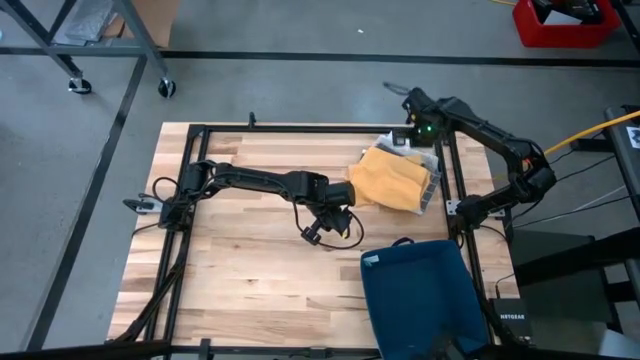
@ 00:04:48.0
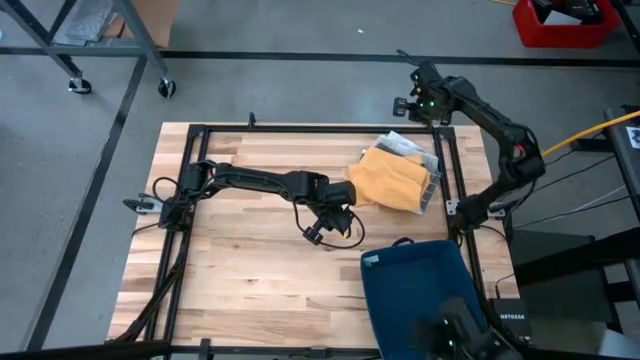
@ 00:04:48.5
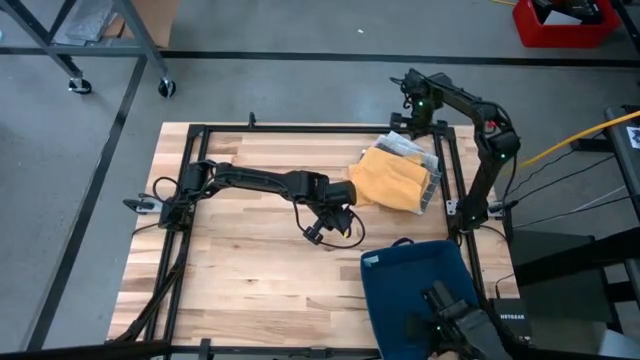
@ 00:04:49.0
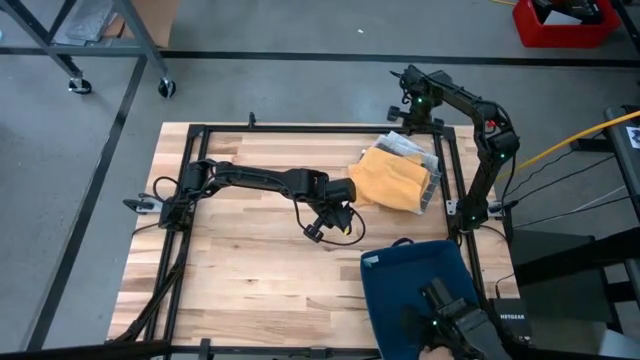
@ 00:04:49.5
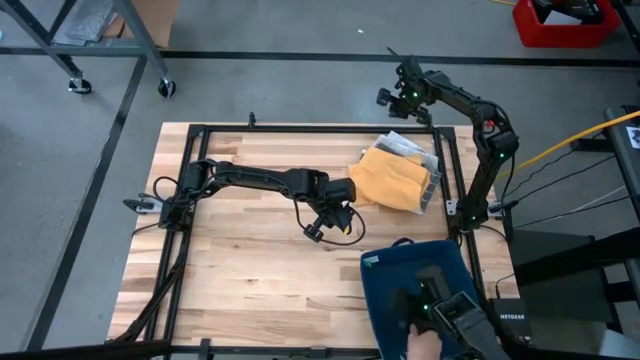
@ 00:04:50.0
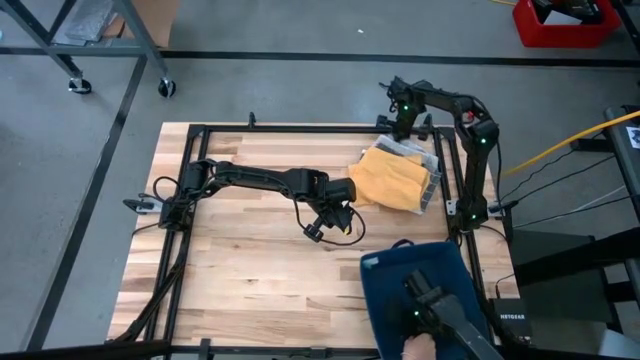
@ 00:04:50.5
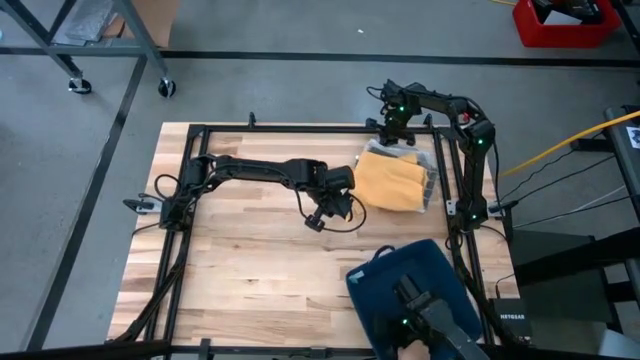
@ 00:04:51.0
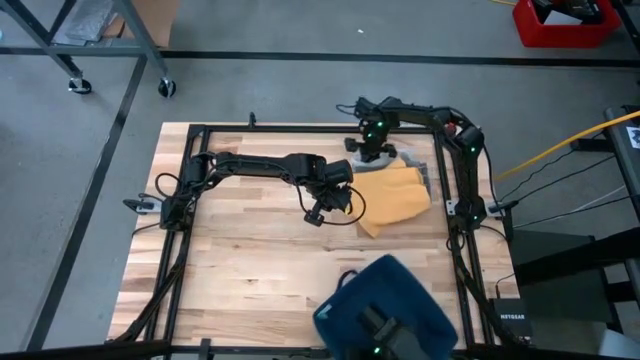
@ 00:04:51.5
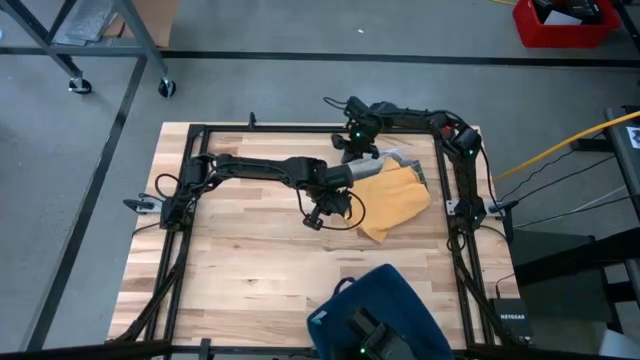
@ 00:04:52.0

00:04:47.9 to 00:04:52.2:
Task: Fold towel
Adjust the stack of towels

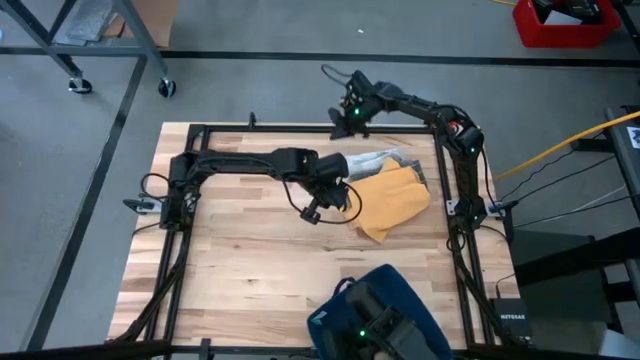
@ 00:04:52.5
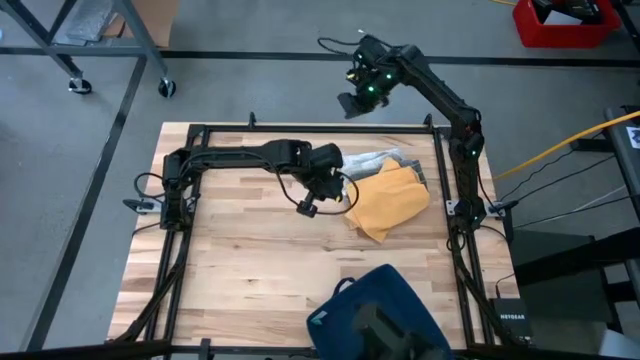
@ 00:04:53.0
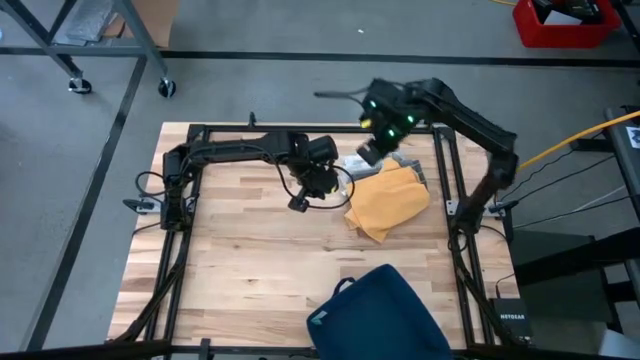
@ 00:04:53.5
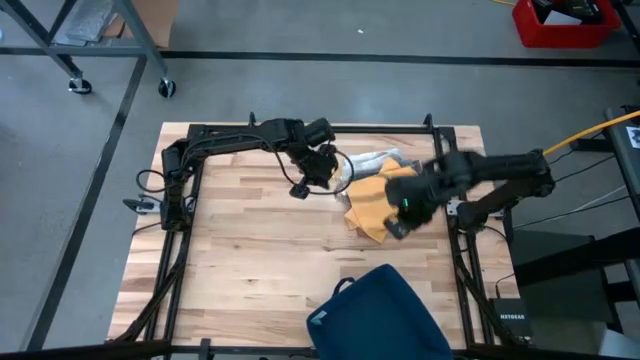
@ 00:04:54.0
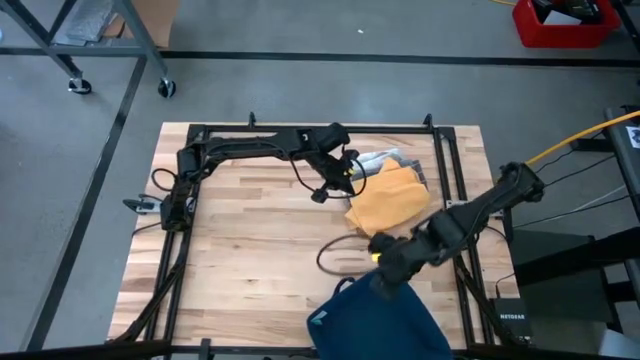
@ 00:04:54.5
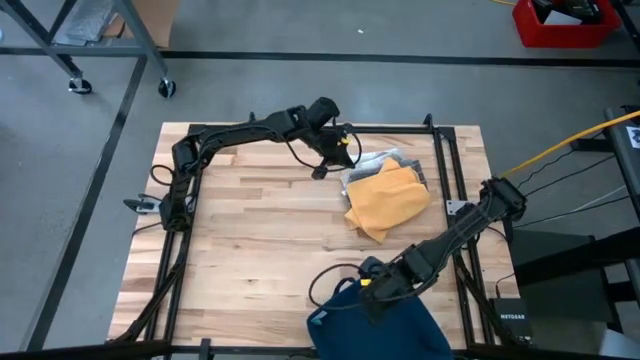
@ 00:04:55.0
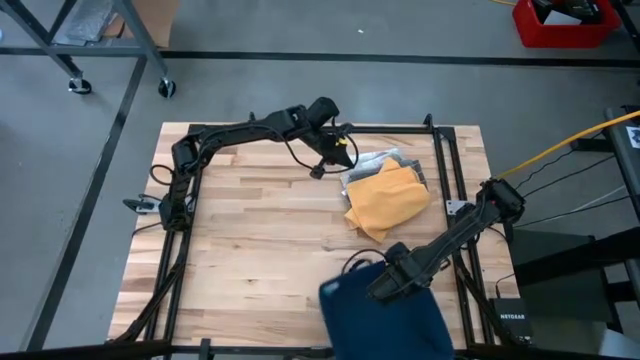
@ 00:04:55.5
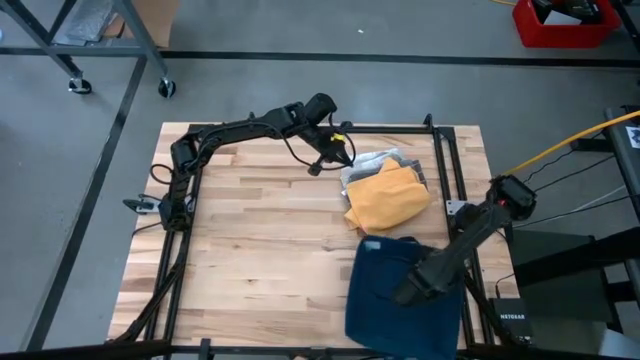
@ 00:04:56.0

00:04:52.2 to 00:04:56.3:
Adjust the blue bin

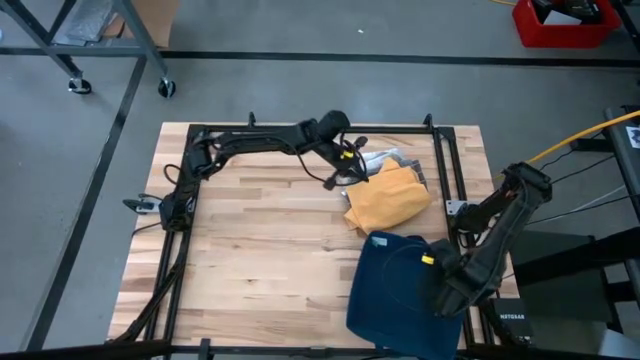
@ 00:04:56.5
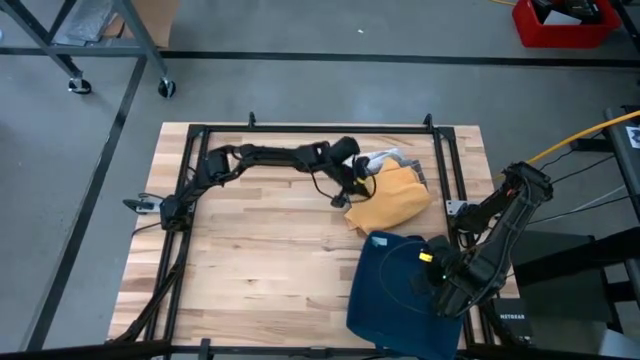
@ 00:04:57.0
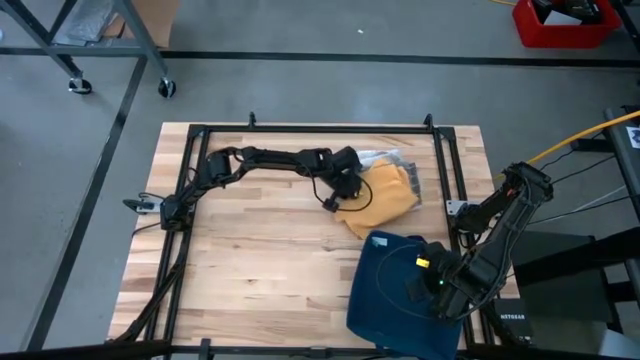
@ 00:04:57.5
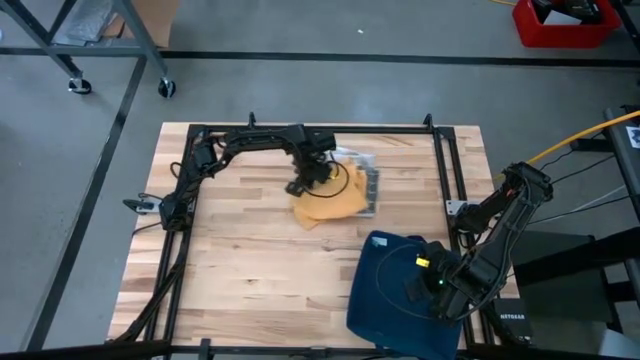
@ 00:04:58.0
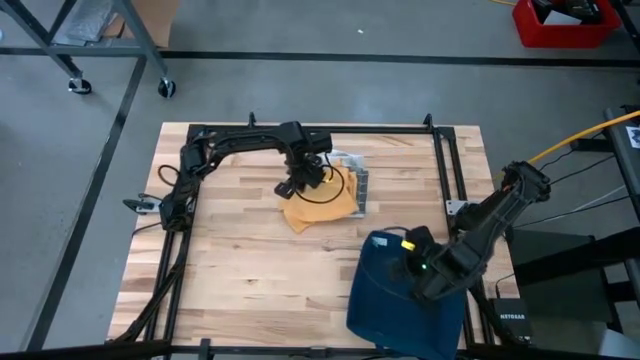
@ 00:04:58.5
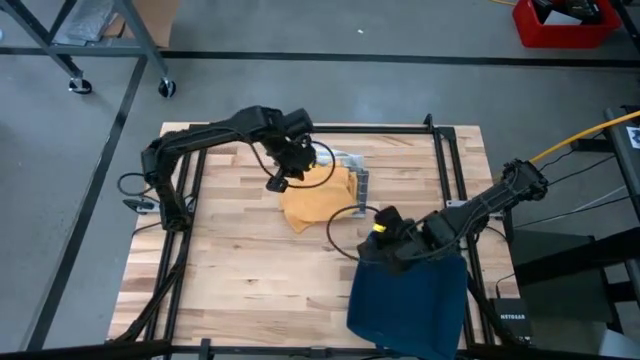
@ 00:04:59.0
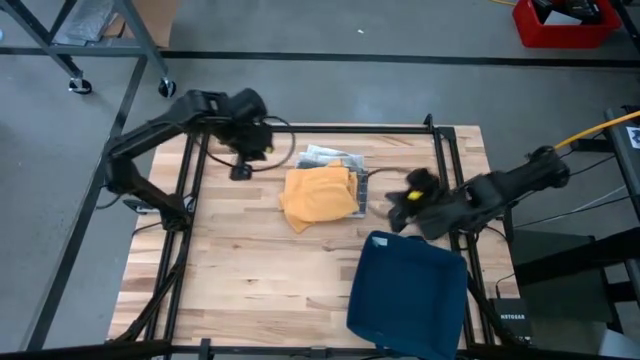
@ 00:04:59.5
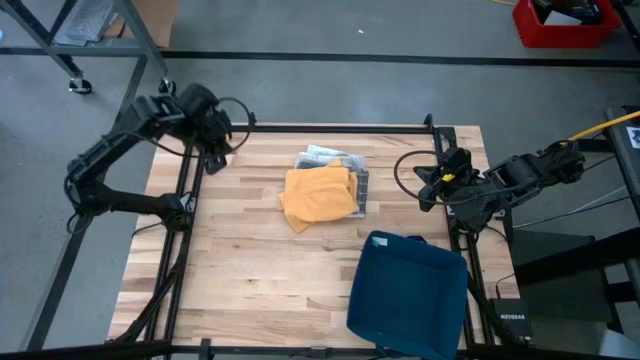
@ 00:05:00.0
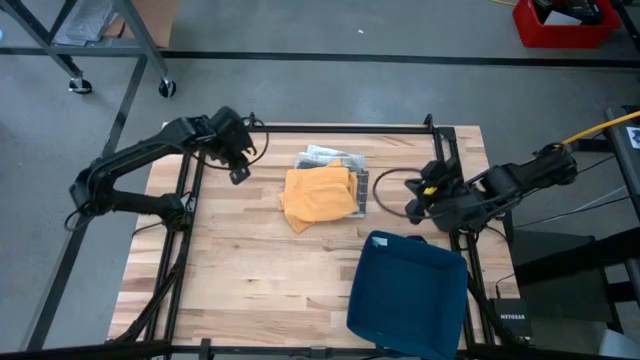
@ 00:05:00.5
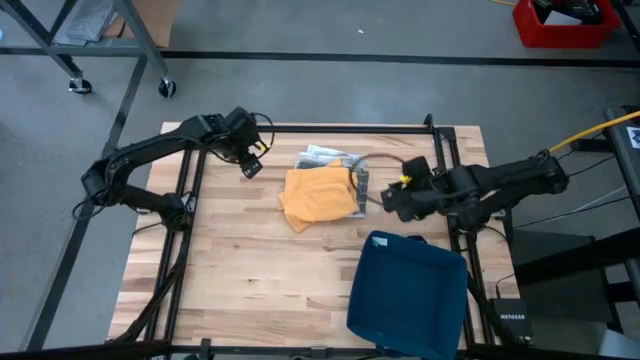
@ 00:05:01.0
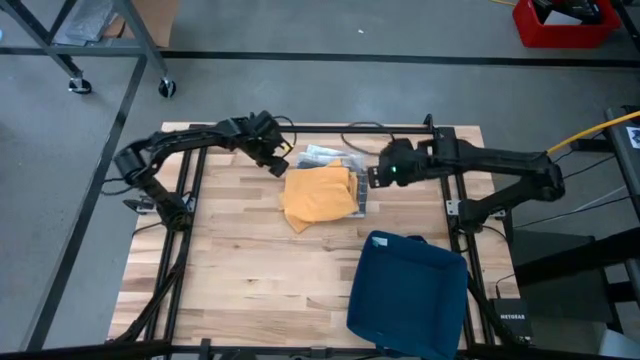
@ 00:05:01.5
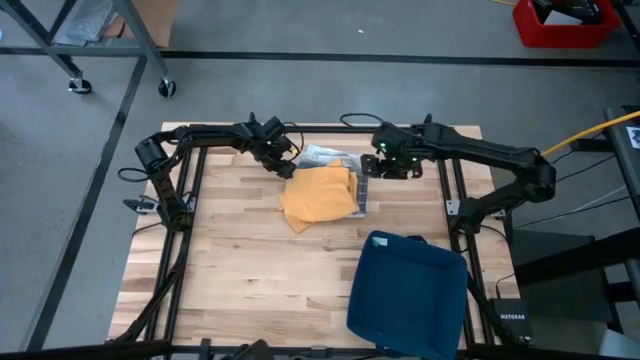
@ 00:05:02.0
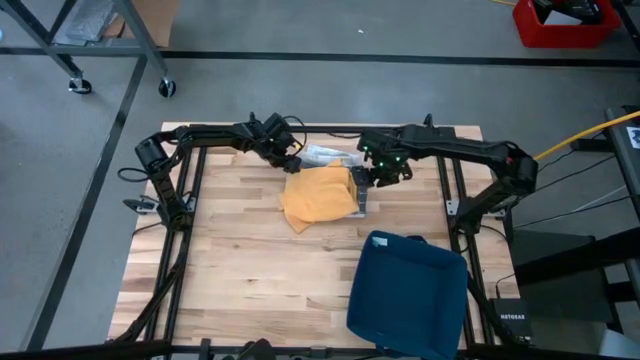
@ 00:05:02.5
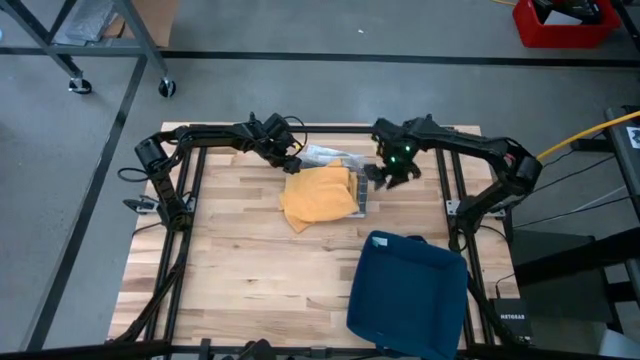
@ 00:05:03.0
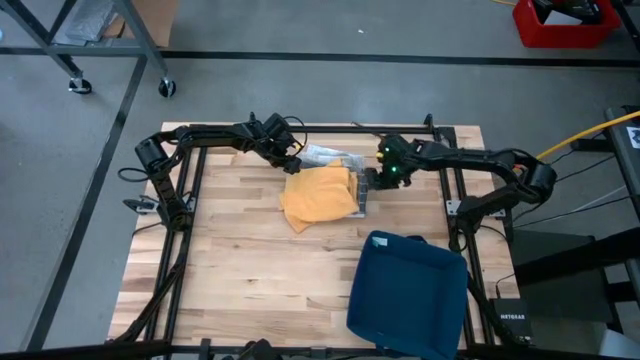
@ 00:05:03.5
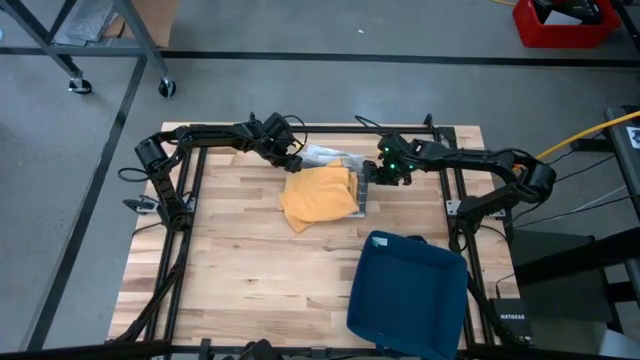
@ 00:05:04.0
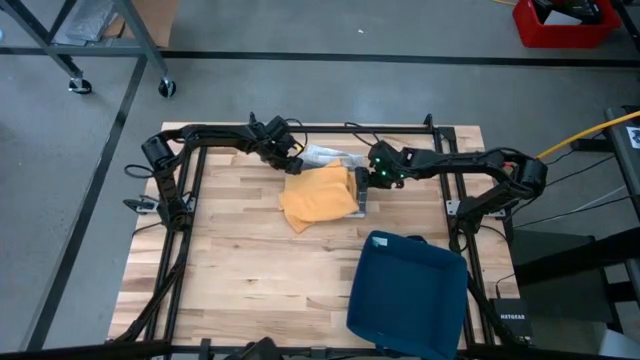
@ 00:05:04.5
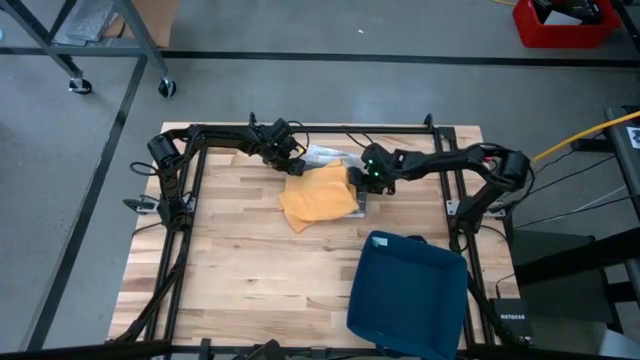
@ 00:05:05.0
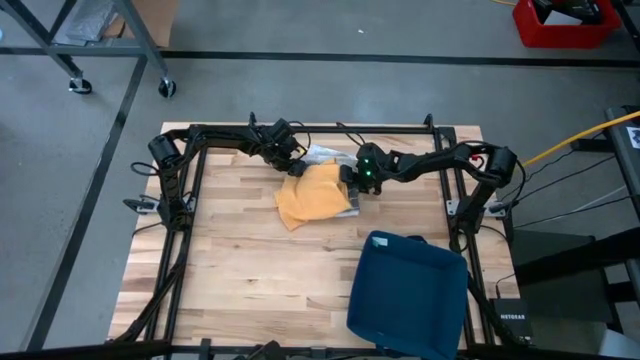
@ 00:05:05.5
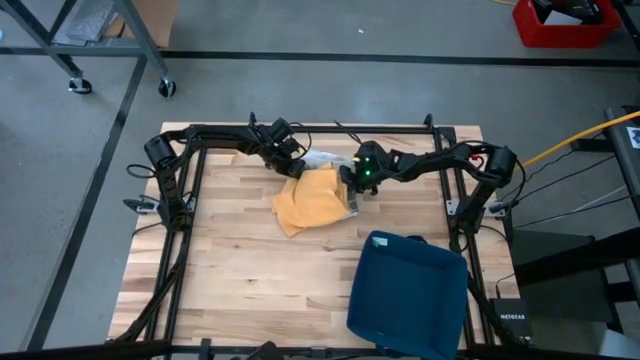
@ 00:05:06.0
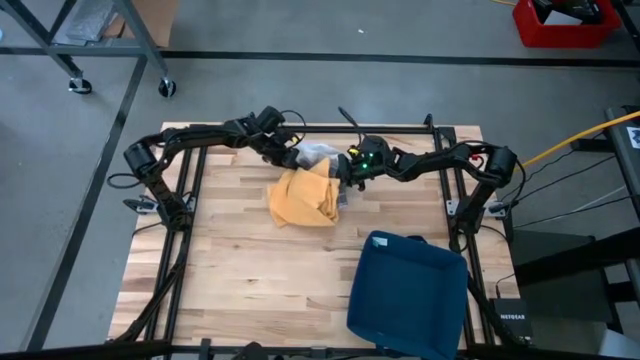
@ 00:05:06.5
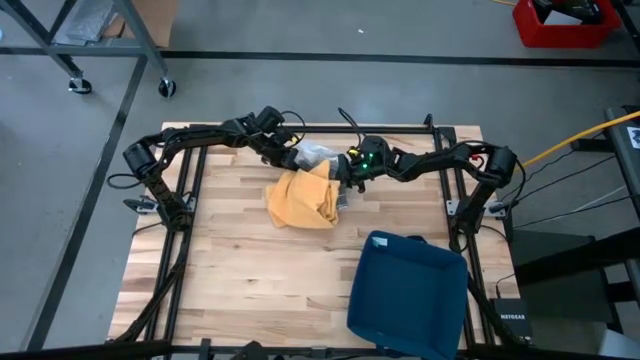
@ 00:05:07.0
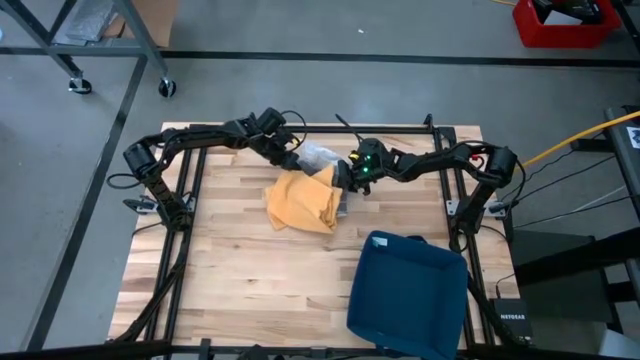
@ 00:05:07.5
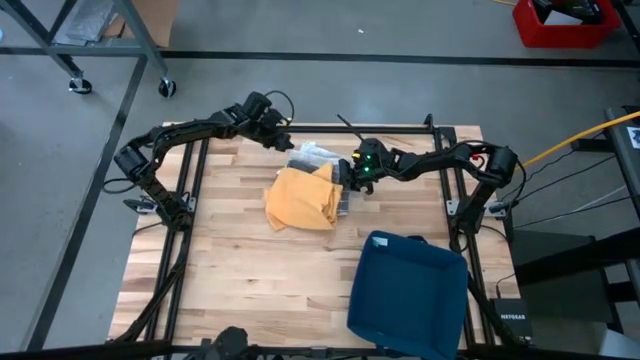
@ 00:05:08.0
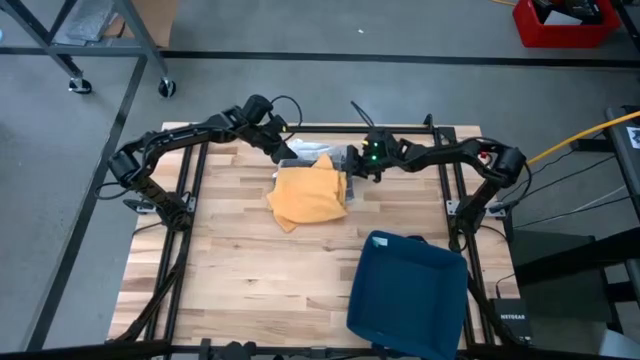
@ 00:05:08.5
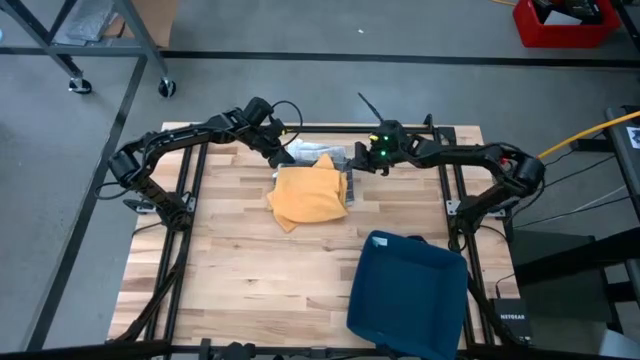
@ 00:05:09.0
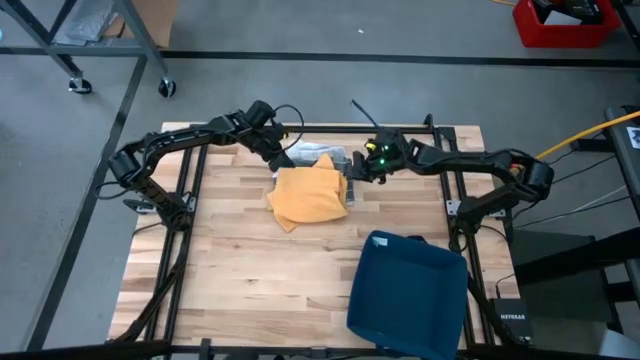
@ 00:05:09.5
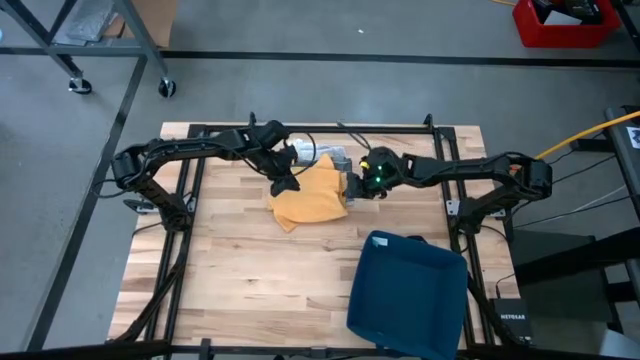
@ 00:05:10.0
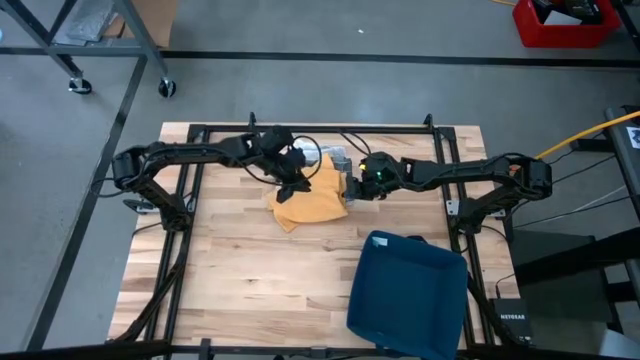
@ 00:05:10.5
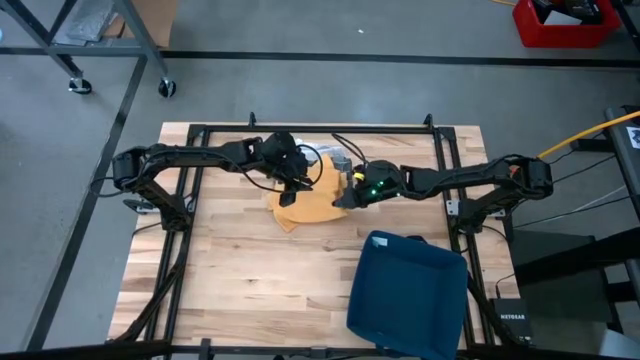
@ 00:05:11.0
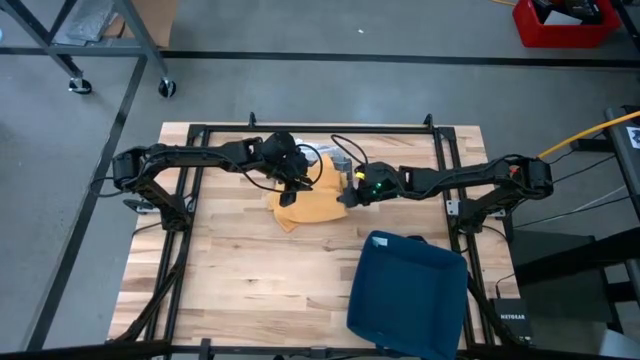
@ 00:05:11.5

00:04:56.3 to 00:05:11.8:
Put the stack of towels into the blue bin
